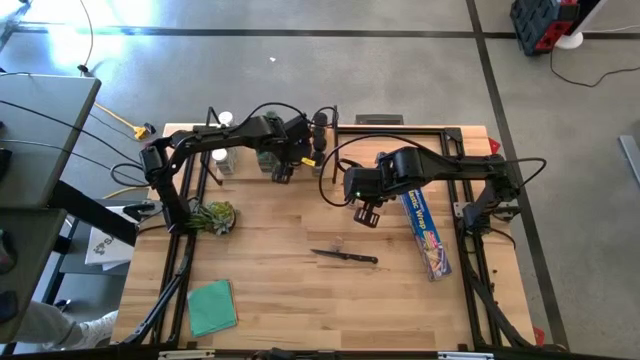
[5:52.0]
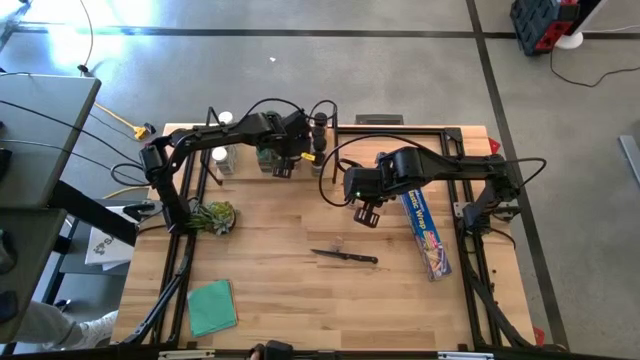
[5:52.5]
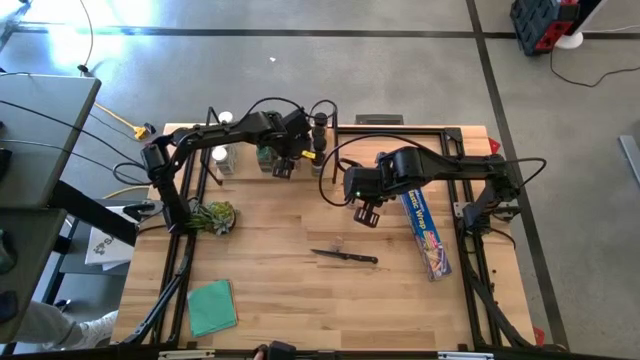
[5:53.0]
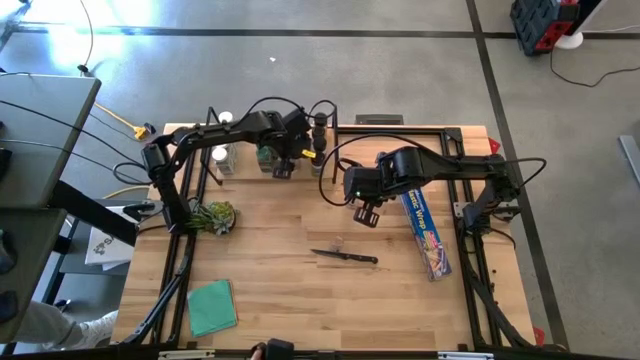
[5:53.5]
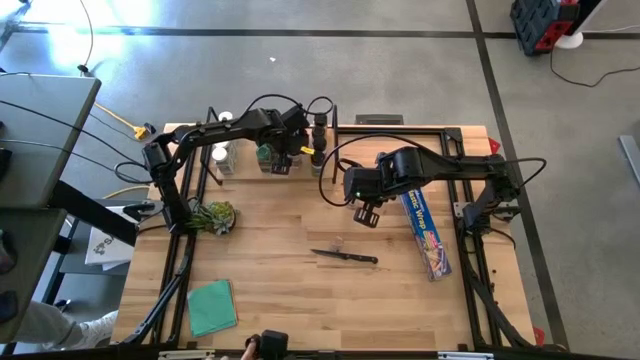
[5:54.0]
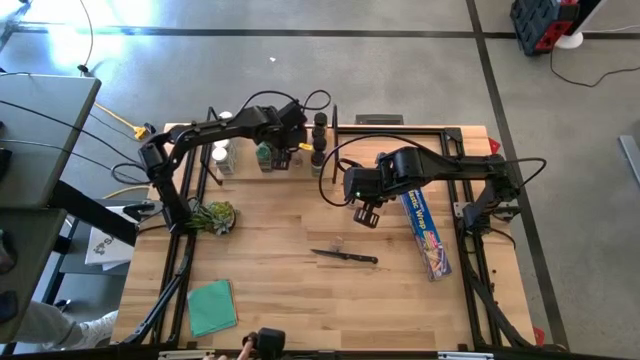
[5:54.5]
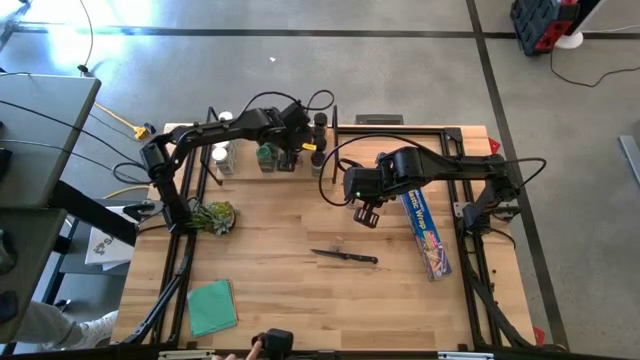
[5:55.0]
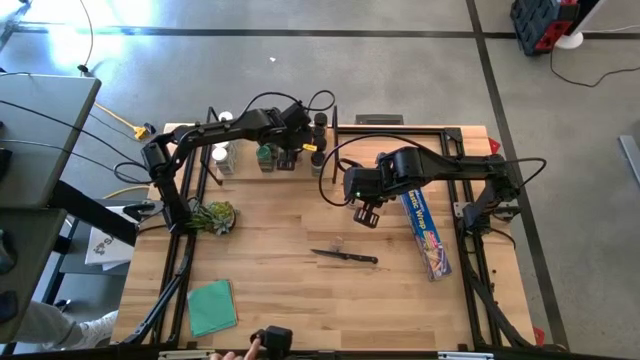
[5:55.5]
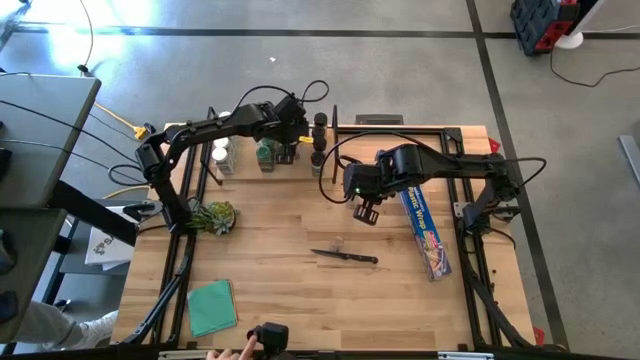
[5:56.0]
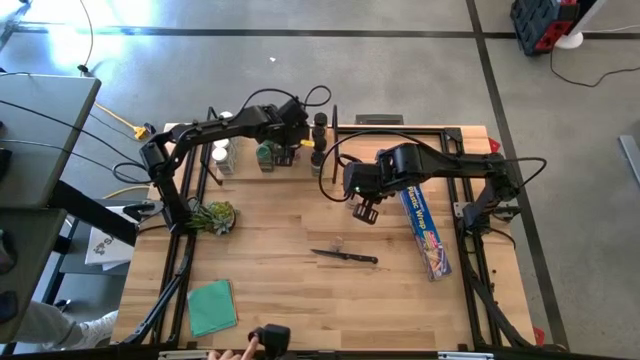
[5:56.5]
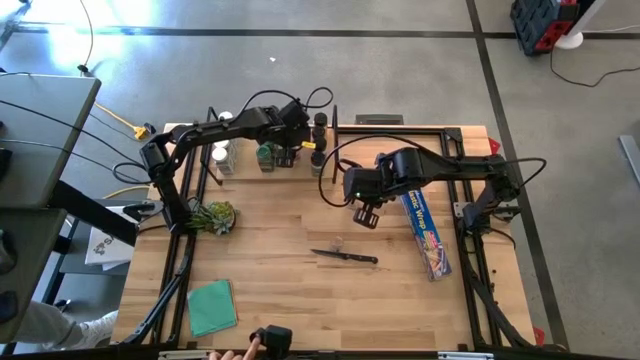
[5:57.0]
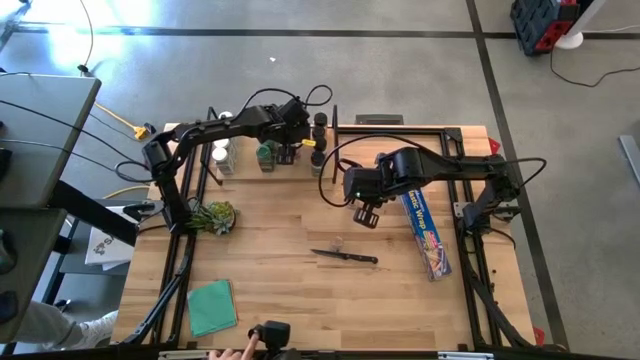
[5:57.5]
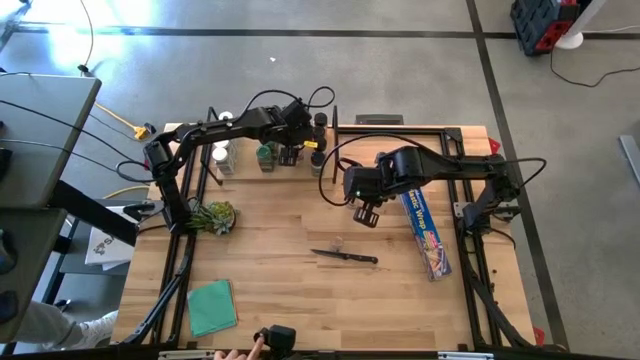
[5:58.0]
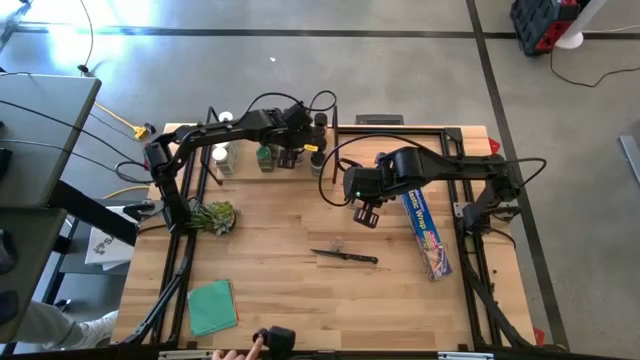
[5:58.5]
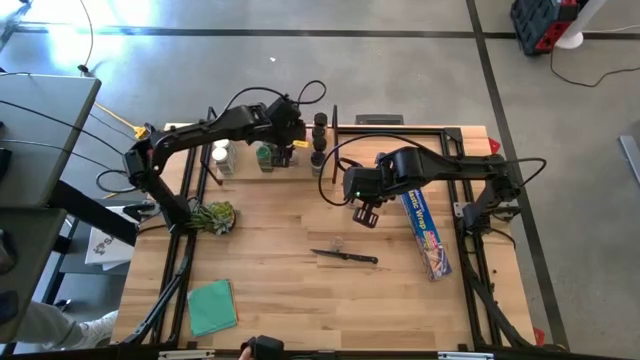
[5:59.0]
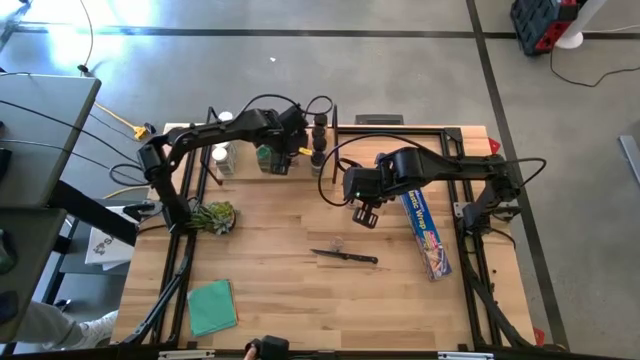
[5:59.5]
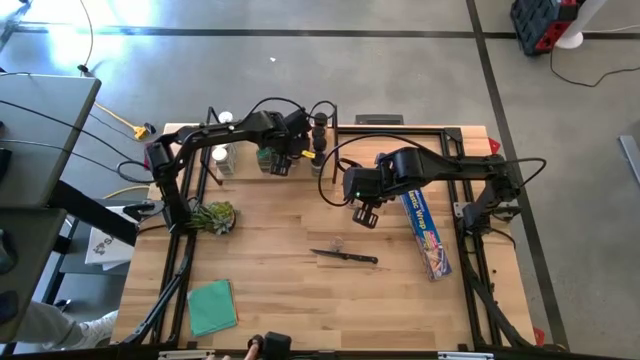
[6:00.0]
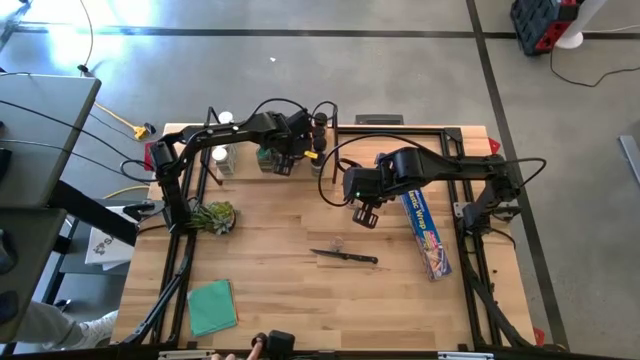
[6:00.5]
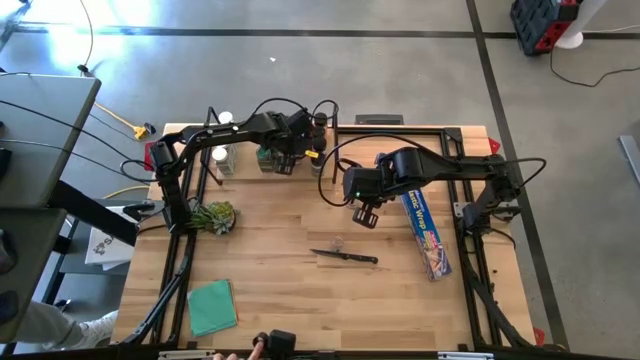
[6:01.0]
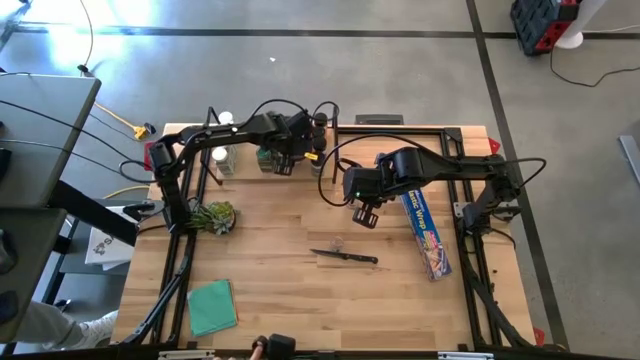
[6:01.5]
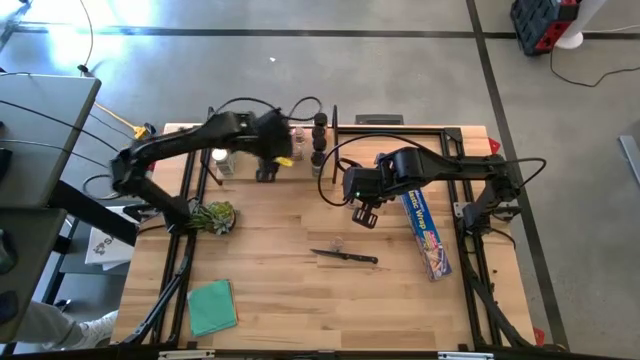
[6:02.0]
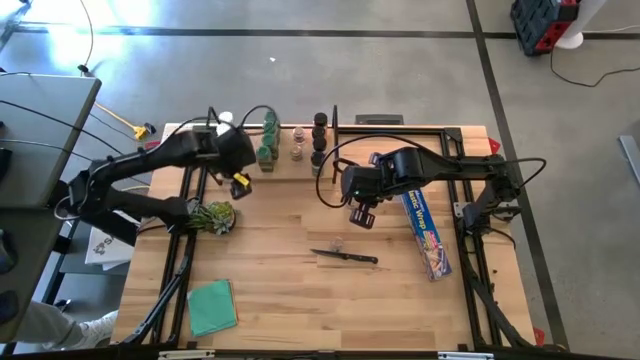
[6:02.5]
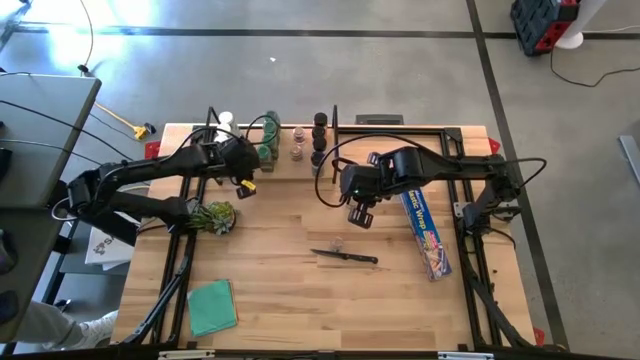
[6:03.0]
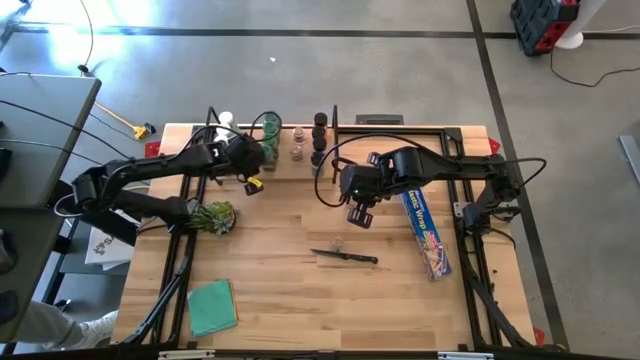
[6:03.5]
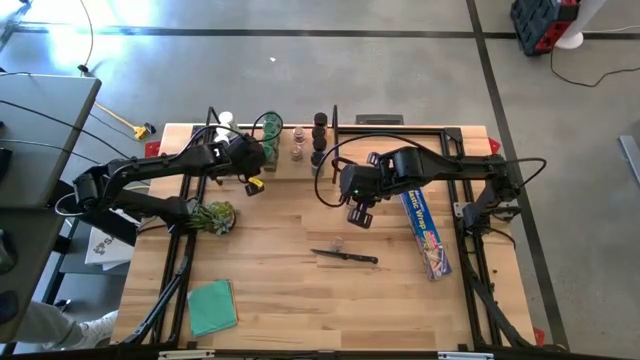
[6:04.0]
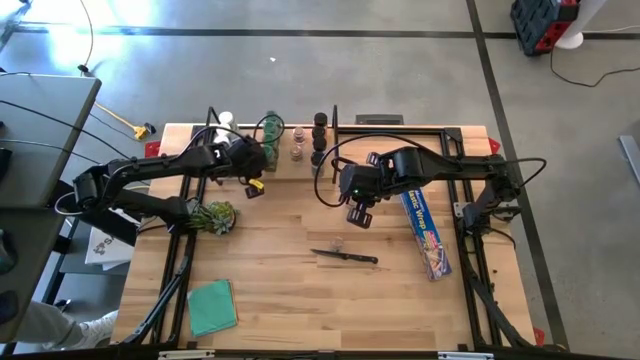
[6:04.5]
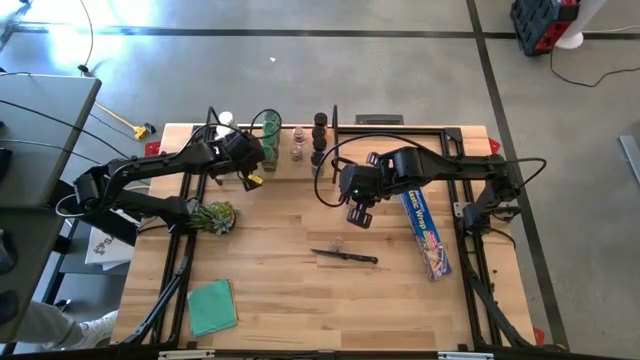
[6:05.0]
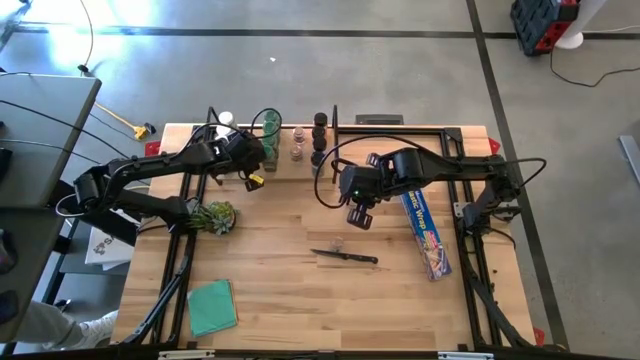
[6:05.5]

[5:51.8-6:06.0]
Task: Shelf spices
Adjust the brown and green lid seasoning bottles on the shelf

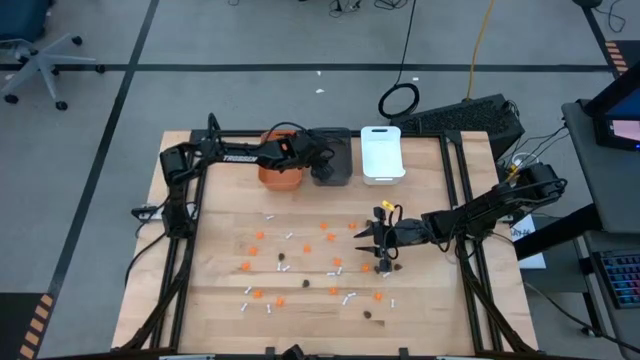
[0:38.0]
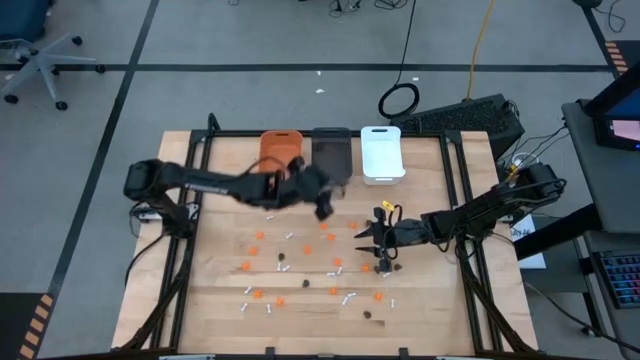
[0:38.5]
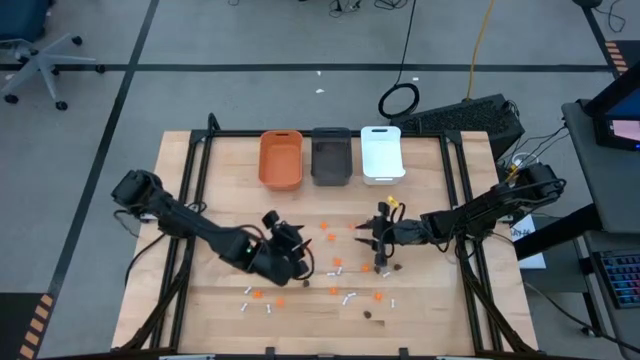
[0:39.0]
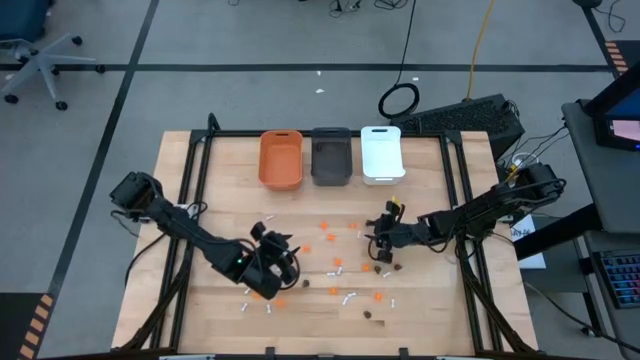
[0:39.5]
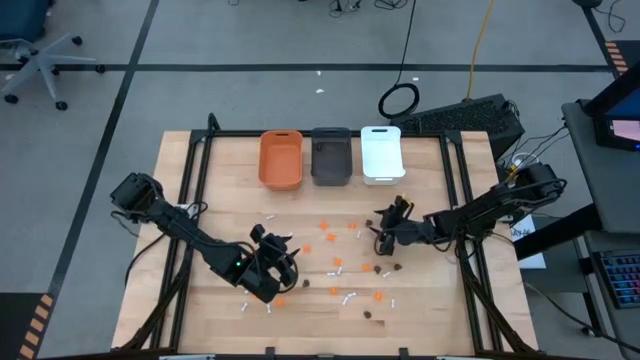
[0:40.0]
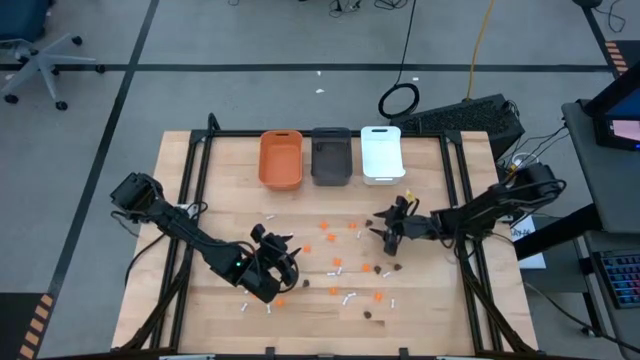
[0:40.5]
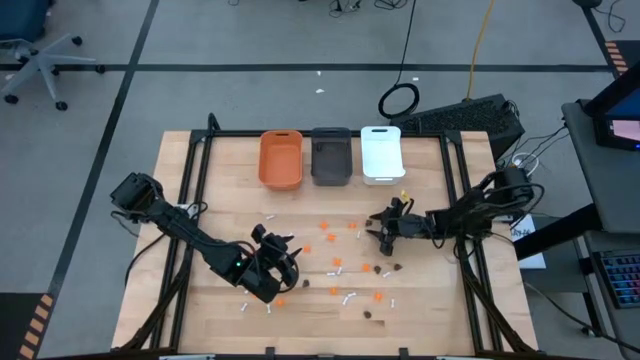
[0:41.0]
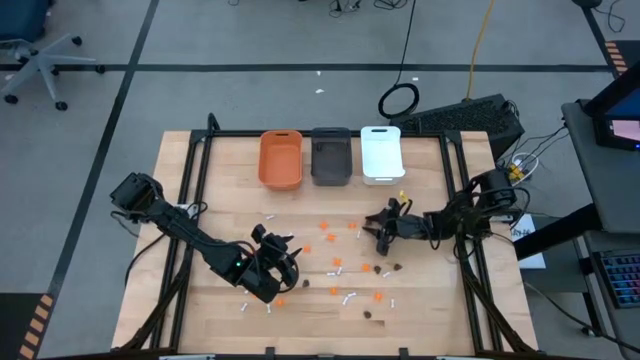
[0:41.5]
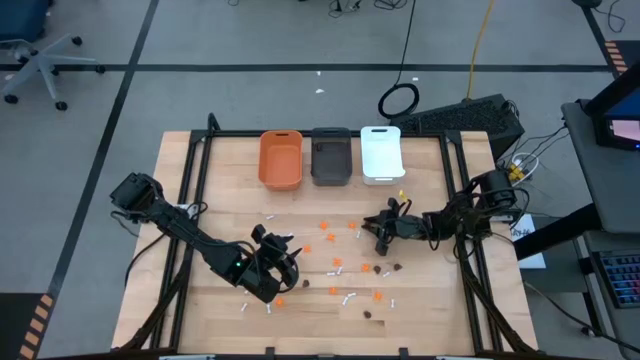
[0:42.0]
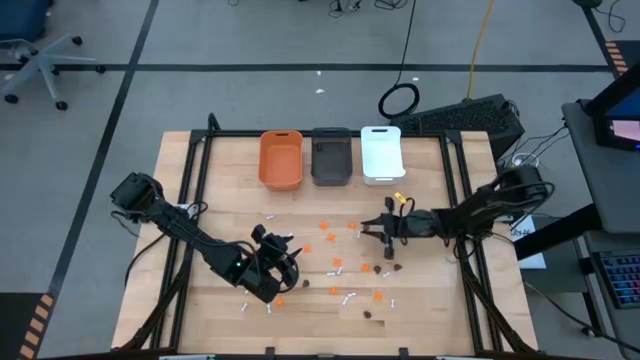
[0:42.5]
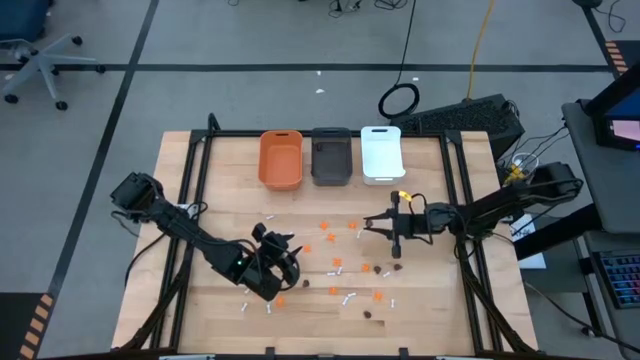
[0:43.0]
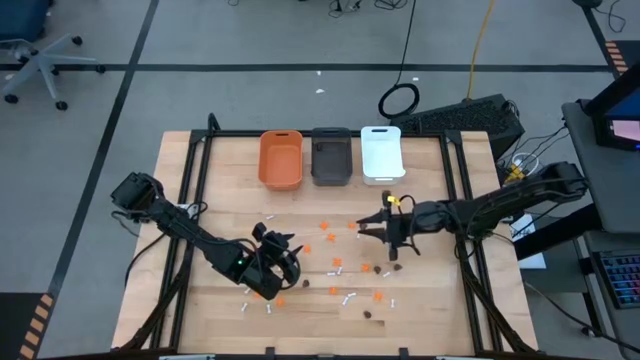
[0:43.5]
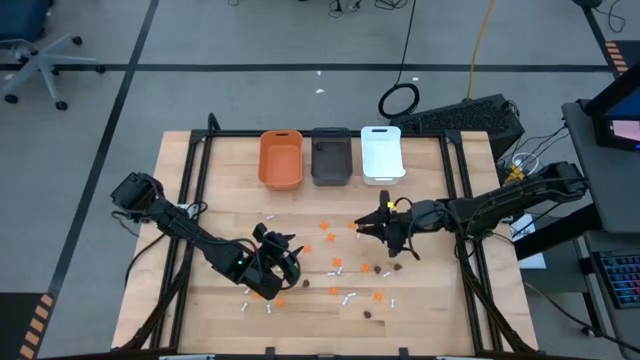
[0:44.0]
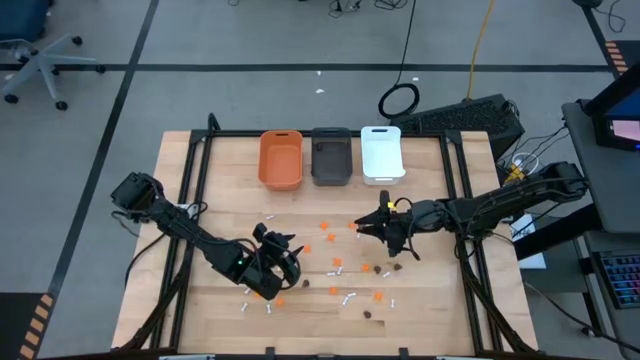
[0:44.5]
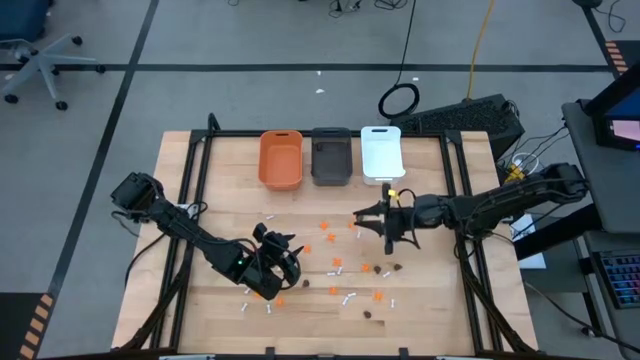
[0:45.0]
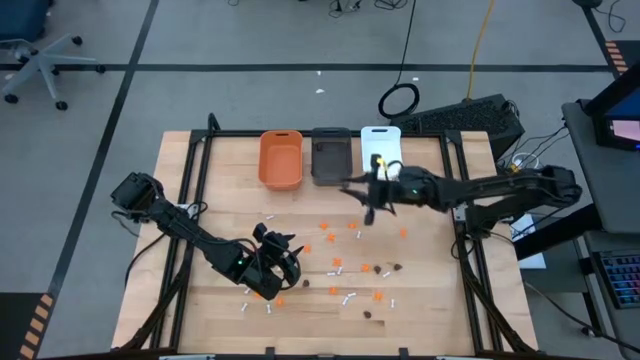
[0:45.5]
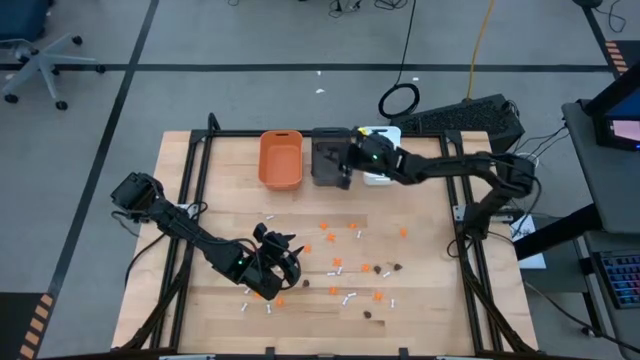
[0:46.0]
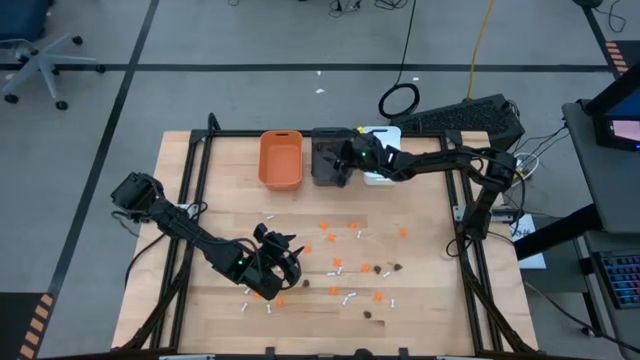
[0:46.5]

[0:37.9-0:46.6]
Task: Sort Halloween decoration
Put the black skull toy into the black bin
